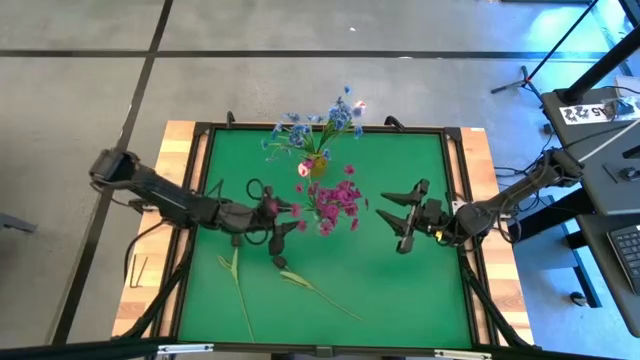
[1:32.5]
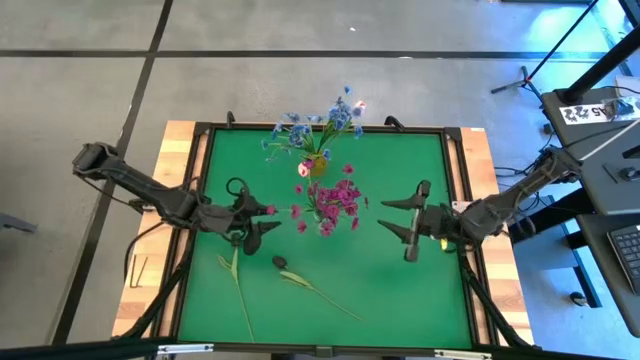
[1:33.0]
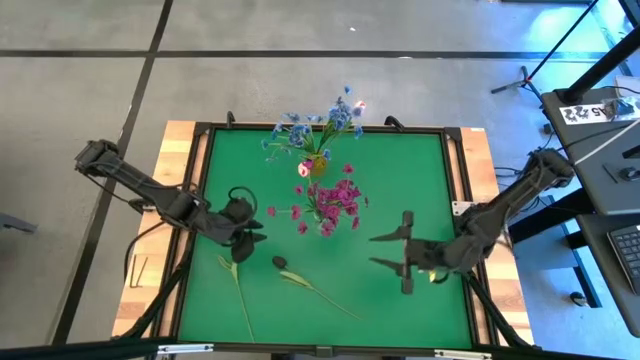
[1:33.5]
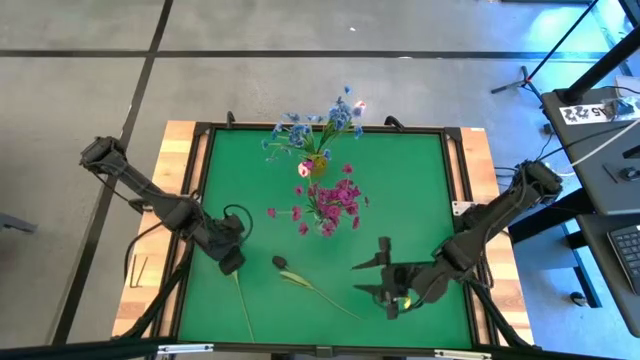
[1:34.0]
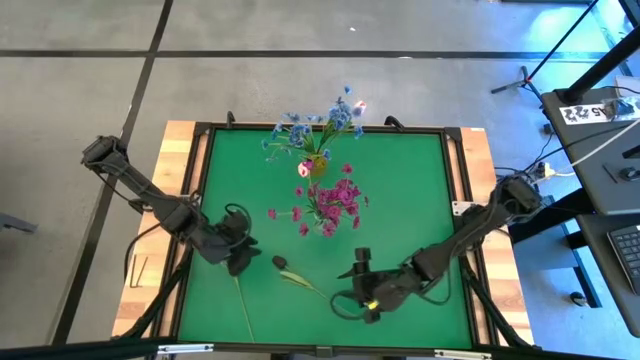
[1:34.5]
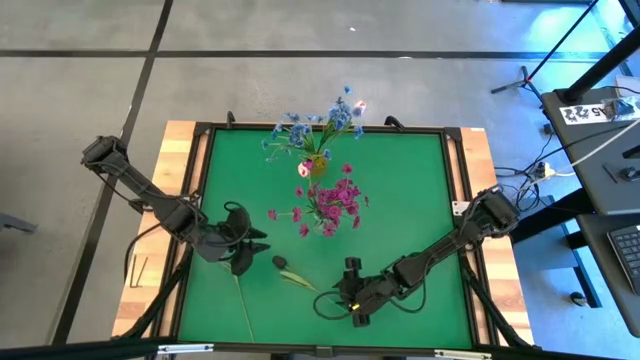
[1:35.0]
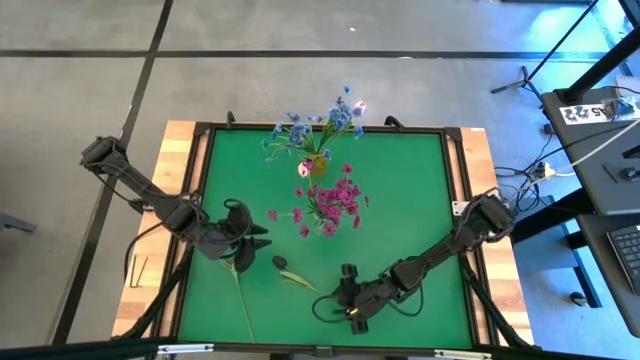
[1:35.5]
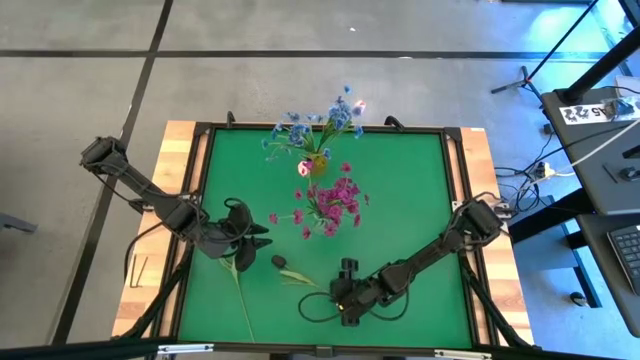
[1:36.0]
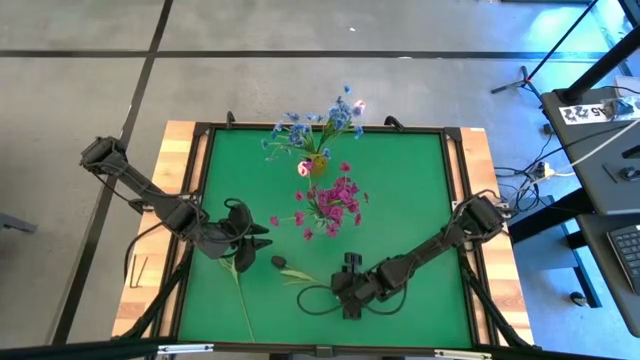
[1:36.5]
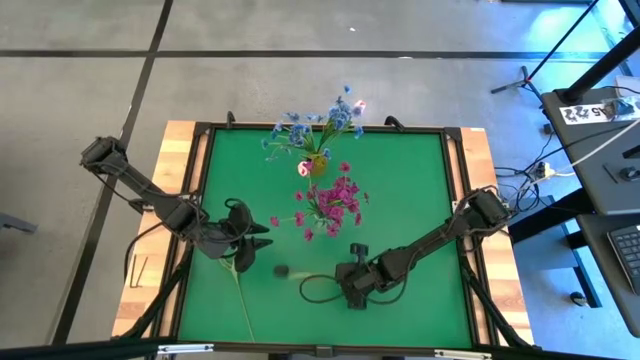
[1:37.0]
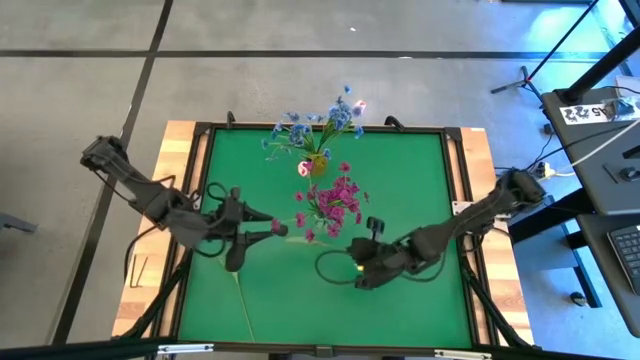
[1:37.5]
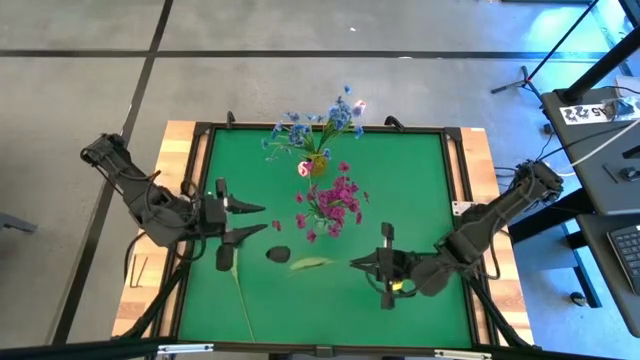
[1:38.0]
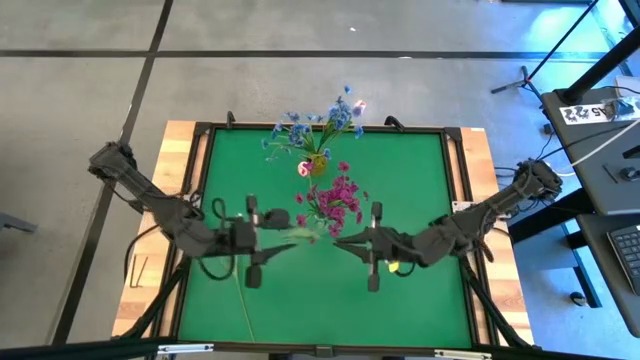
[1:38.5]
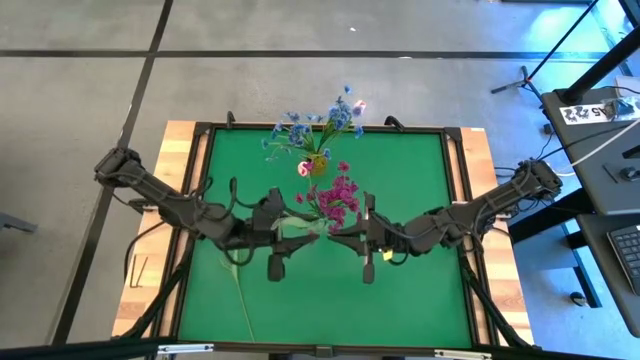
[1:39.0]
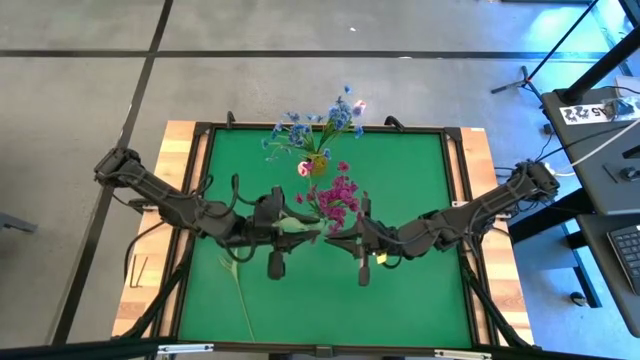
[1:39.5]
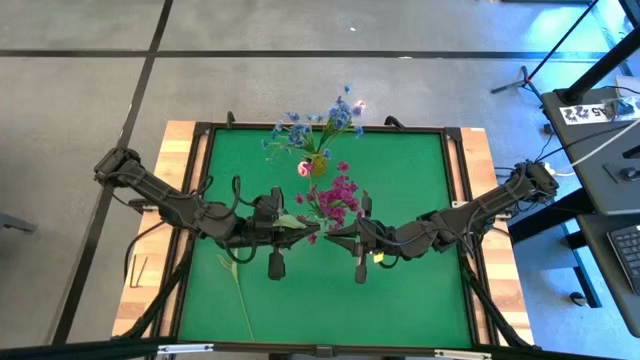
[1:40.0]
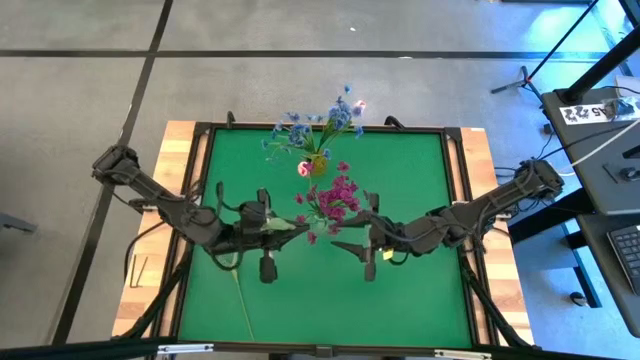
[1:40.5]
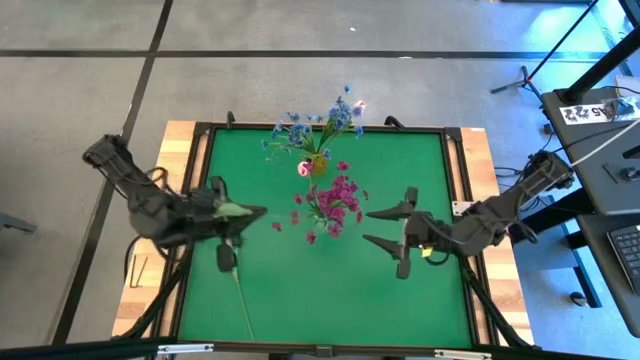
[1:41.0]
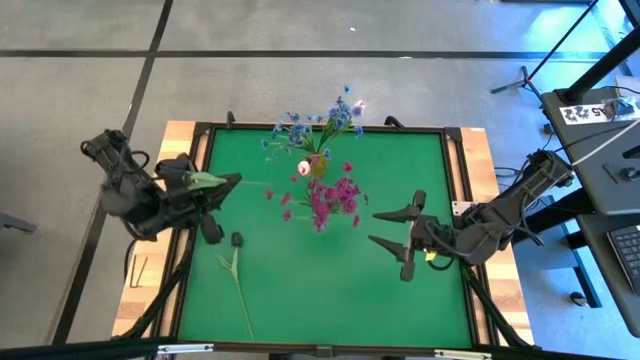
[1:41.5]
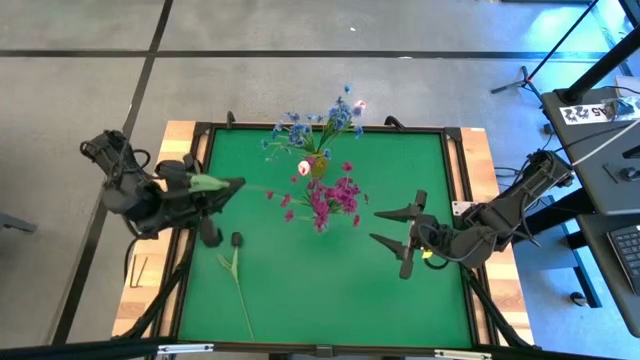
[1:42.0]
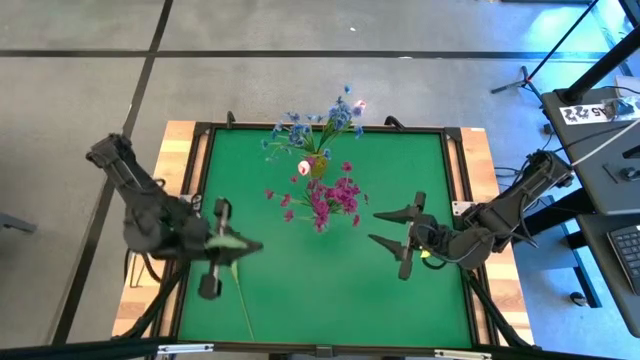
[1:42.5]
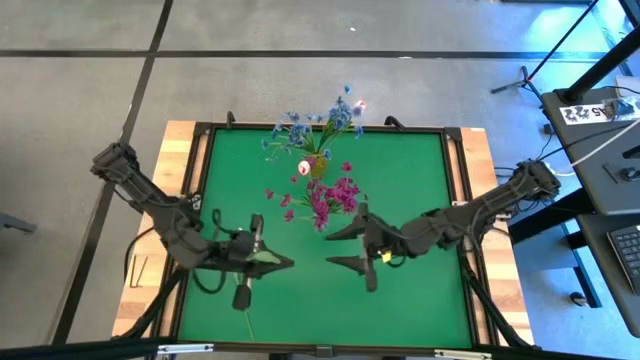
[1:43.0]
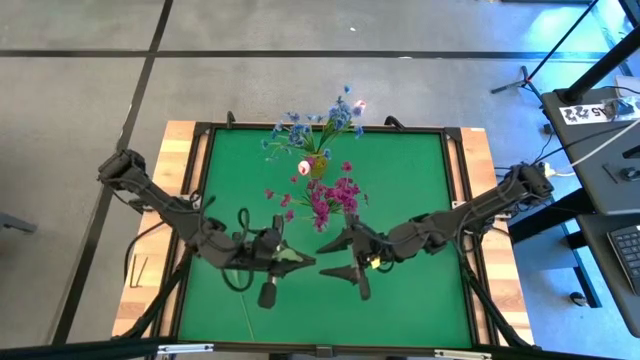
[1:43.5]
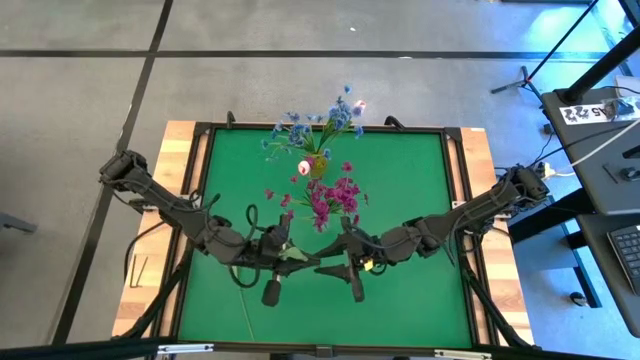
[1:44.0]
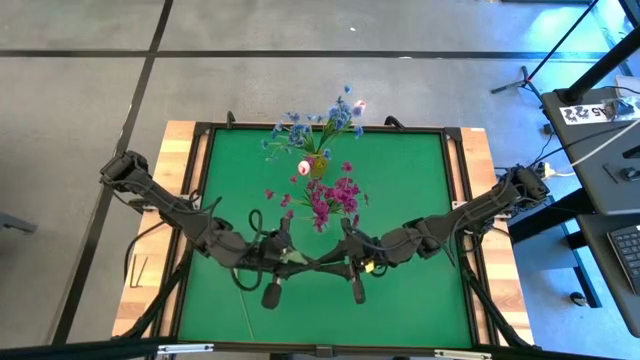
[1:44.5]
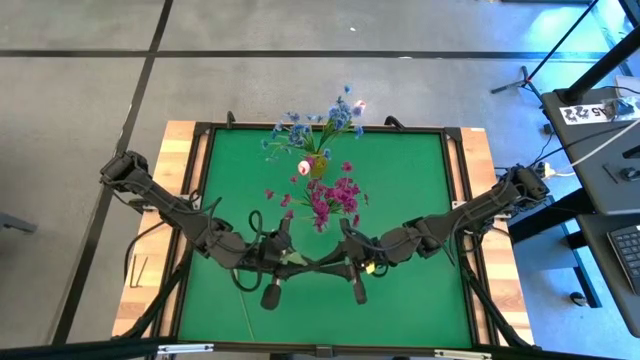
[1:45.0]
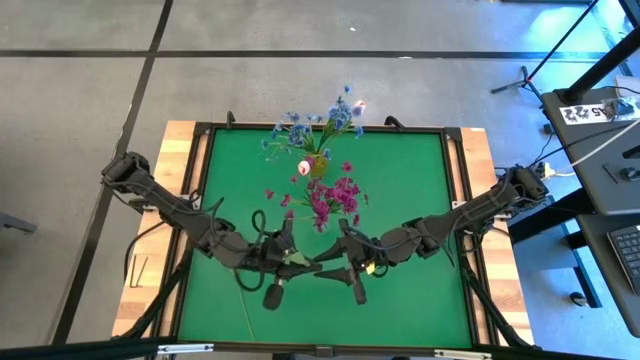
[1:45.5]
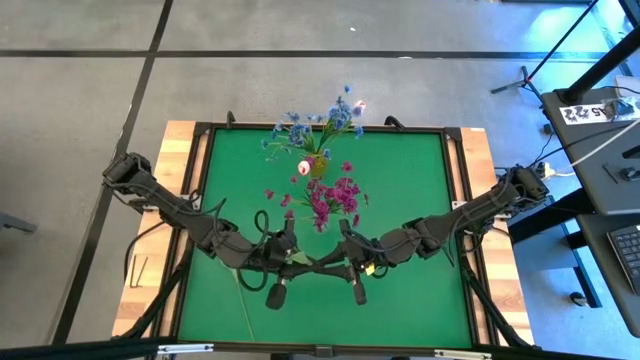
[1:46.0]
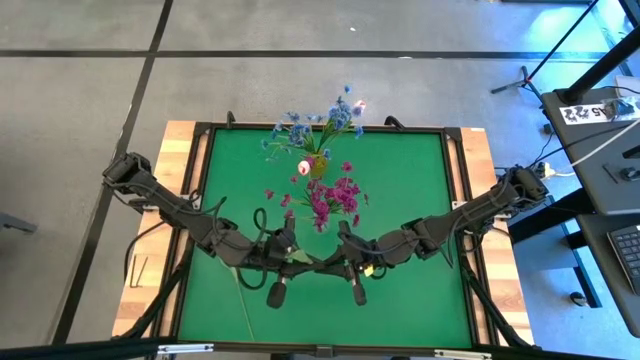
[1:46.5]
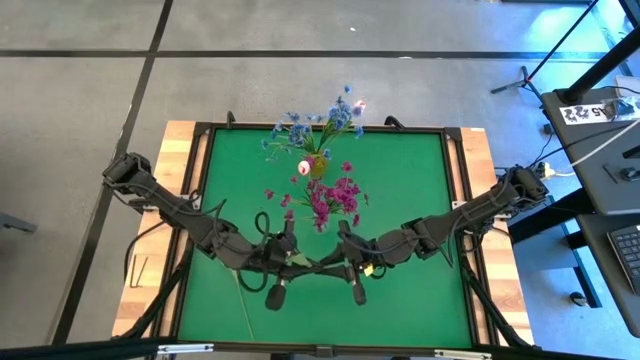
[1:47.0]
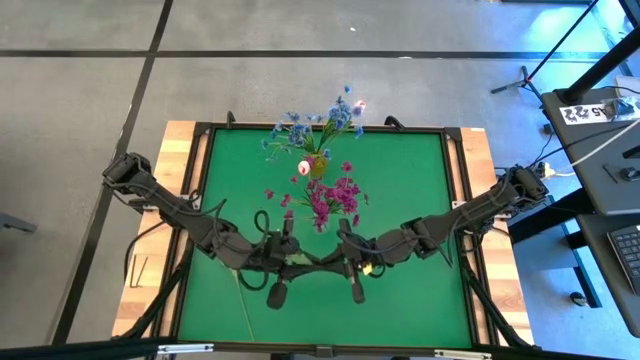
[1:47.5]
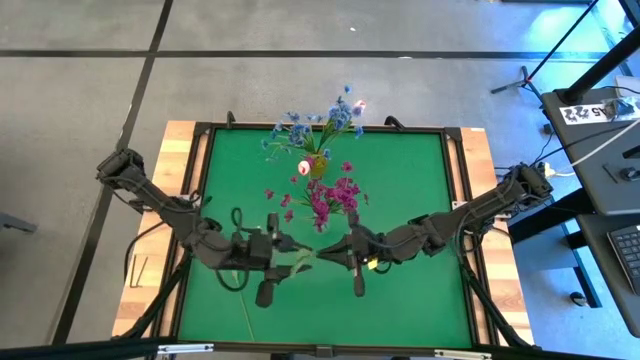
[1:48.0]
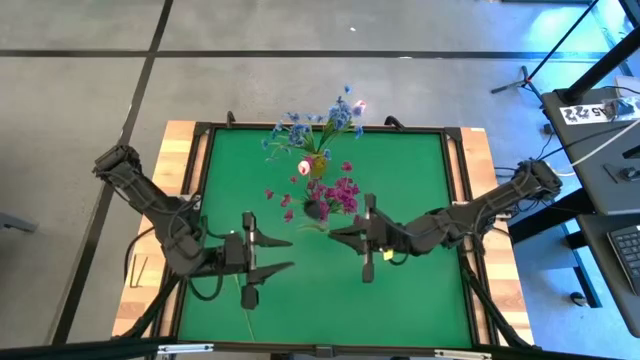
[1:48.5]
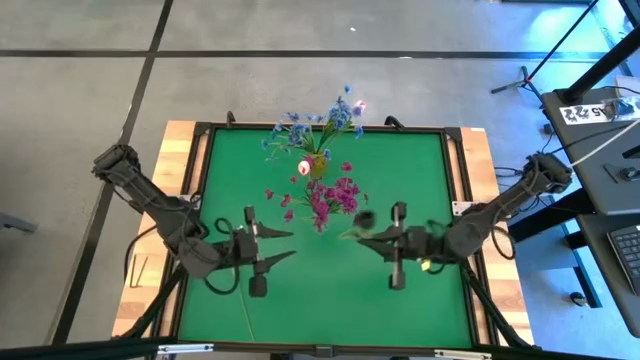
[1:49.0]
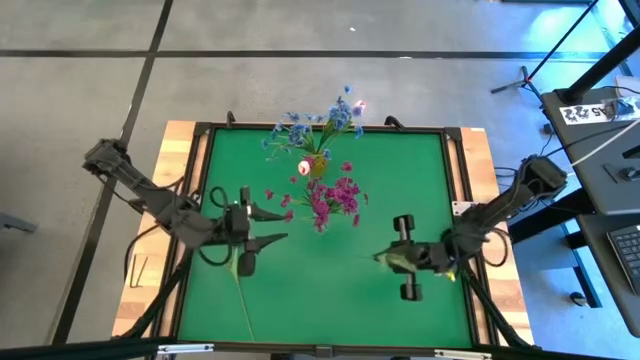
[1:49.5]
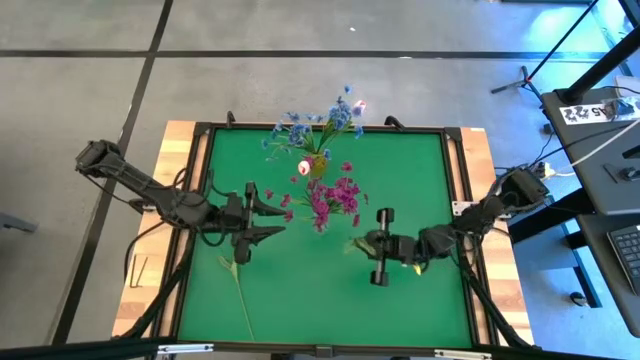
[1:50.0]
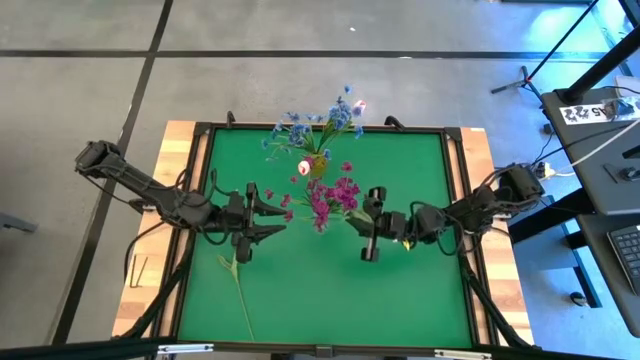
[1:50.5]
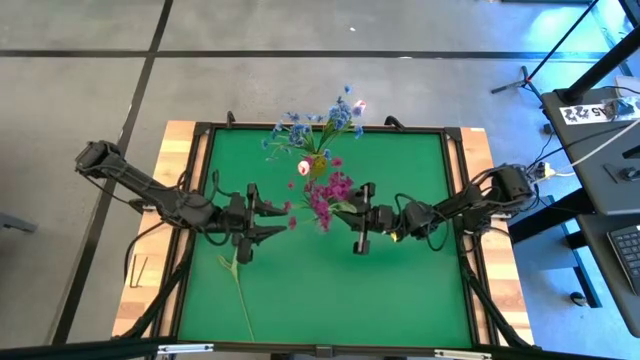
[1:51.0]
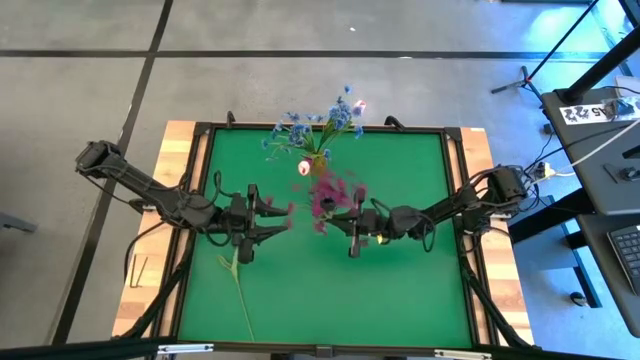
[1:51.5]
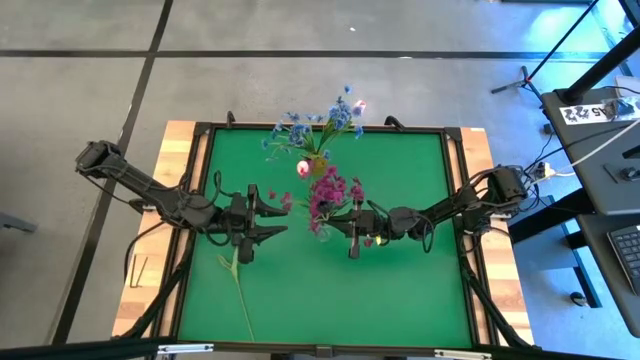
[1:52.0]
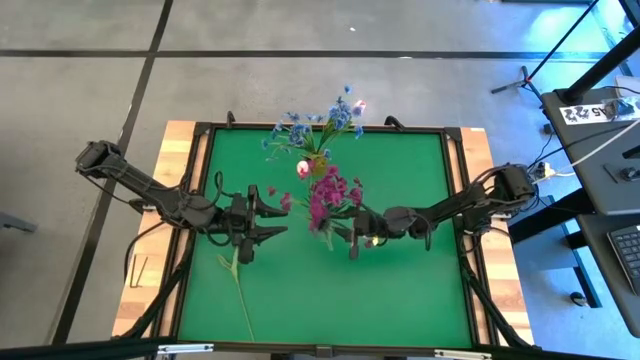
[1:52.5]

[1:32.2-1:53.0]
Task: Sort flowers into vase by color
Put the right black flower into the transparent vase
